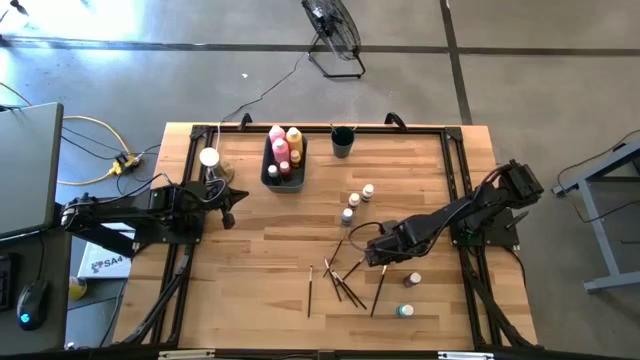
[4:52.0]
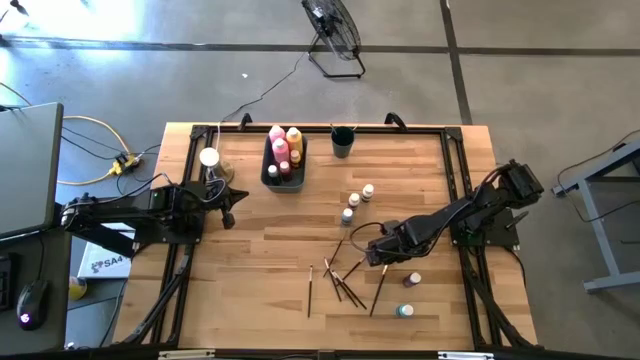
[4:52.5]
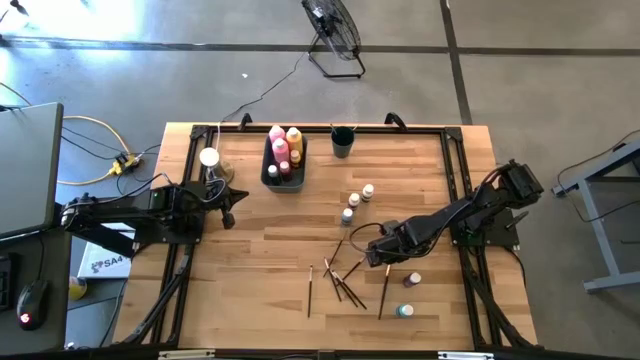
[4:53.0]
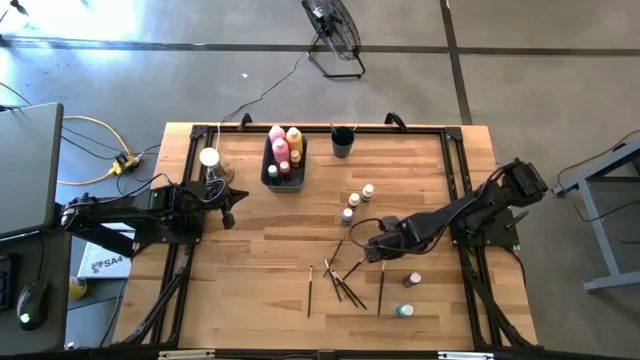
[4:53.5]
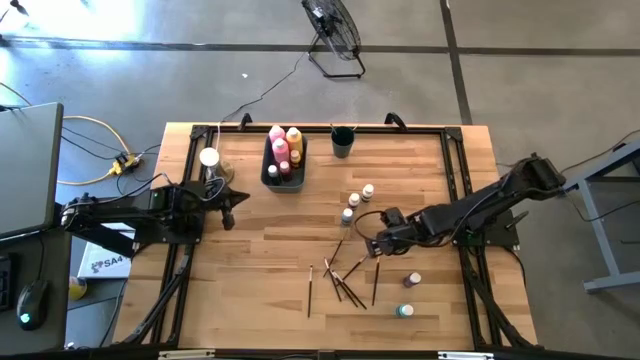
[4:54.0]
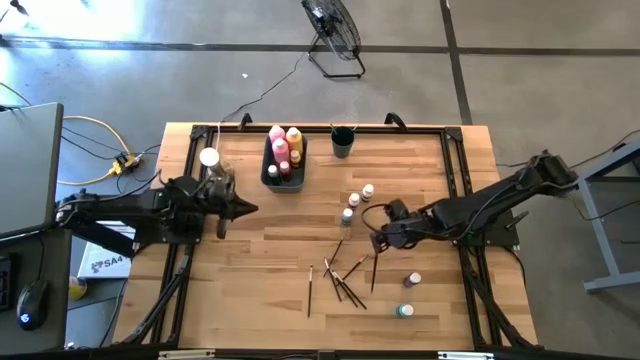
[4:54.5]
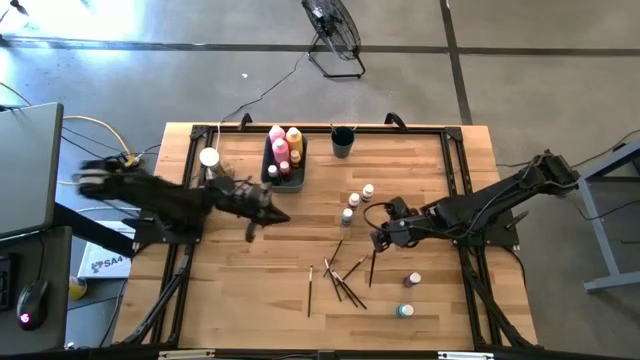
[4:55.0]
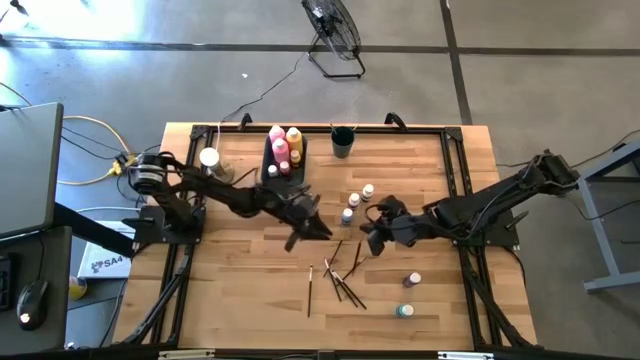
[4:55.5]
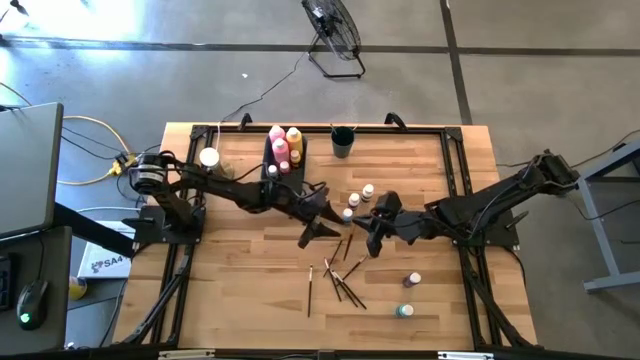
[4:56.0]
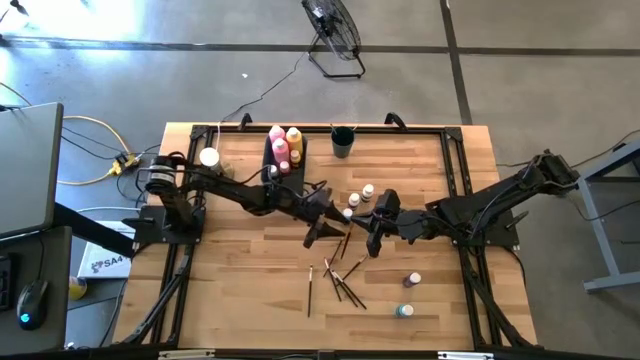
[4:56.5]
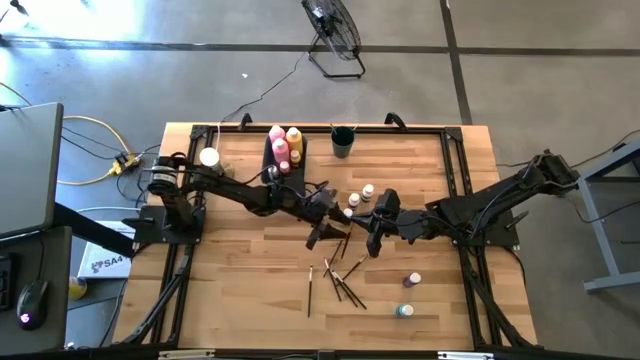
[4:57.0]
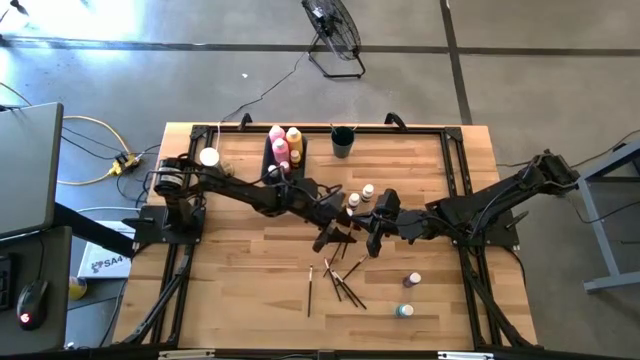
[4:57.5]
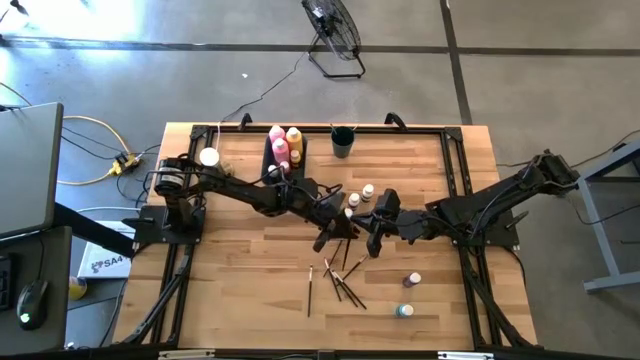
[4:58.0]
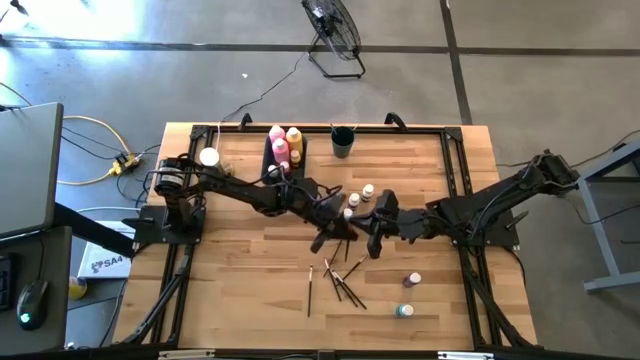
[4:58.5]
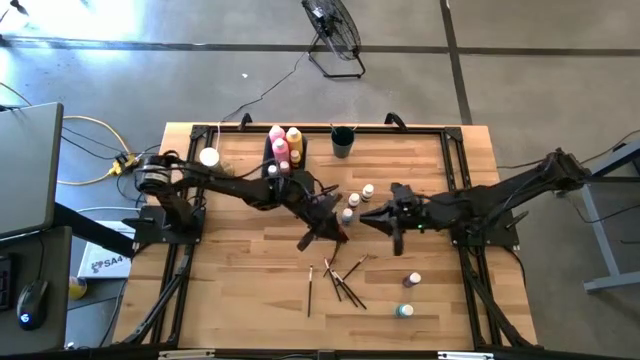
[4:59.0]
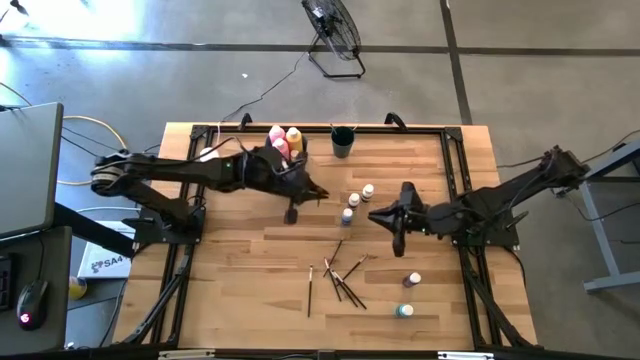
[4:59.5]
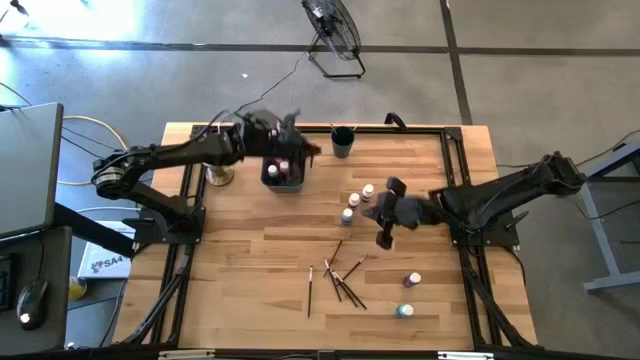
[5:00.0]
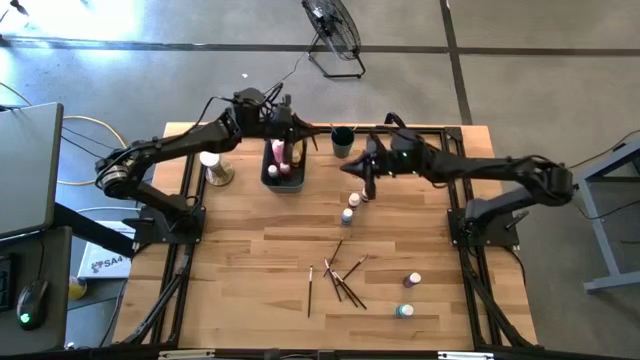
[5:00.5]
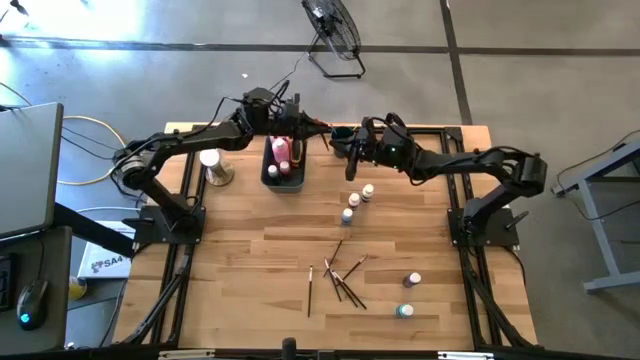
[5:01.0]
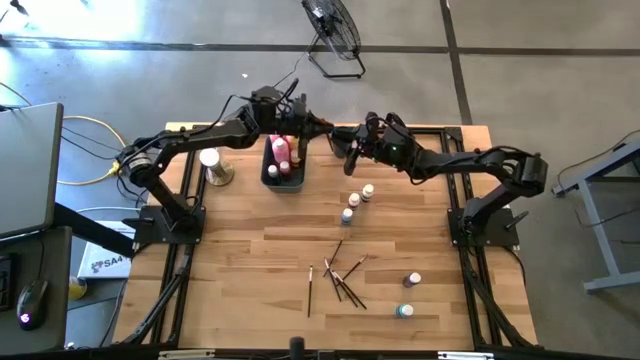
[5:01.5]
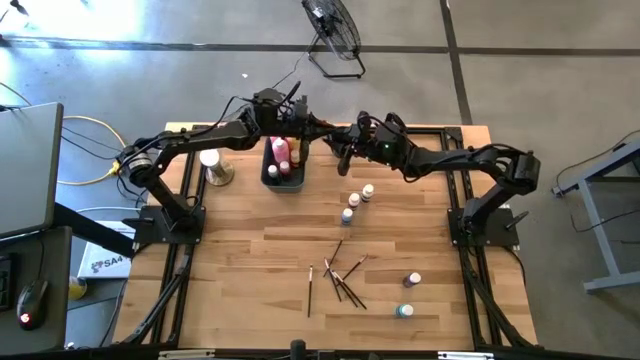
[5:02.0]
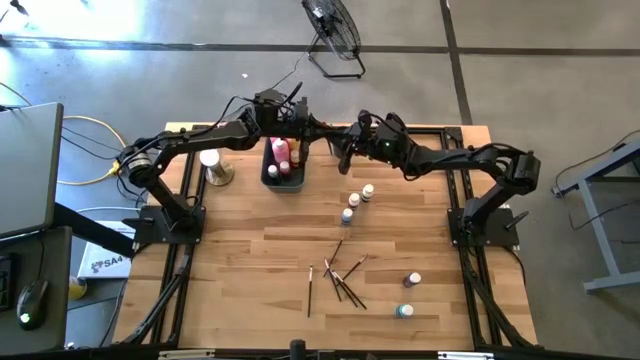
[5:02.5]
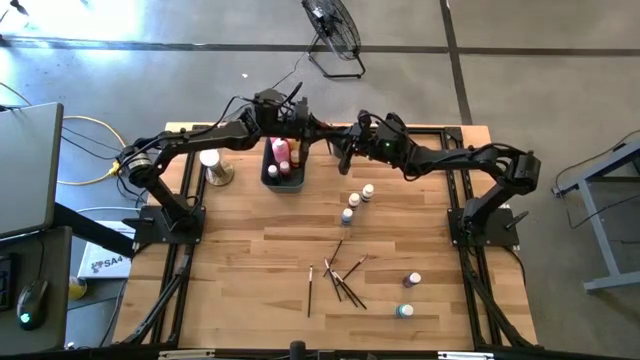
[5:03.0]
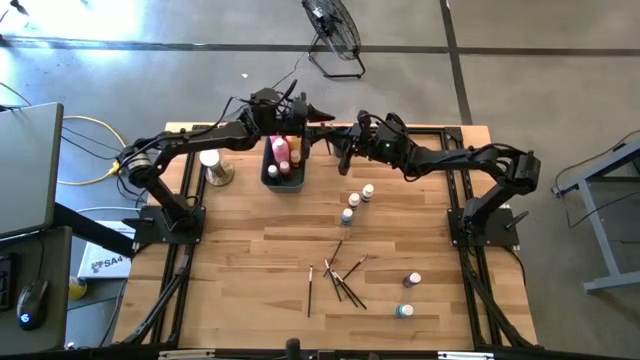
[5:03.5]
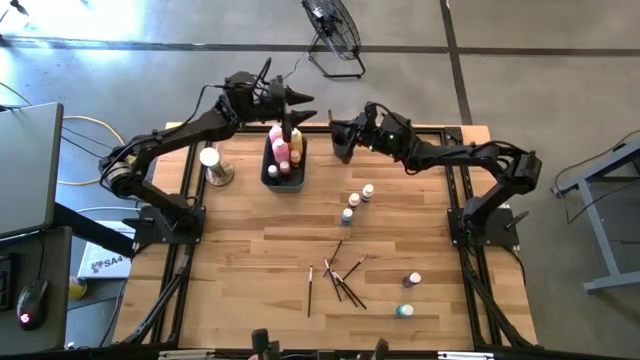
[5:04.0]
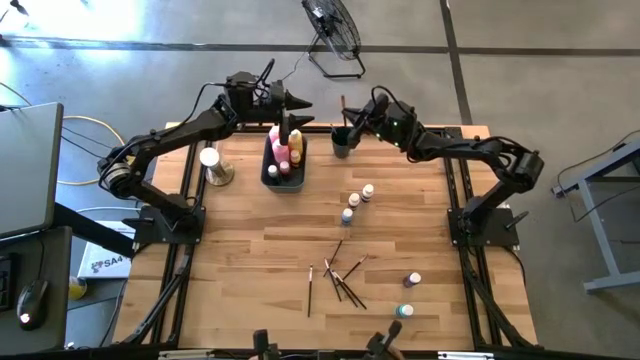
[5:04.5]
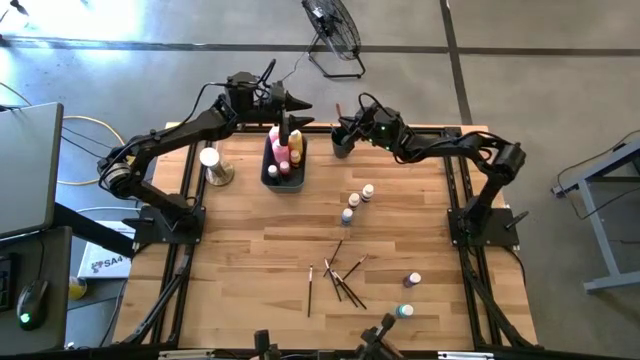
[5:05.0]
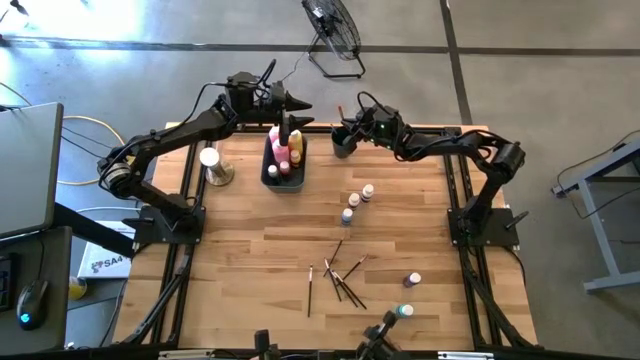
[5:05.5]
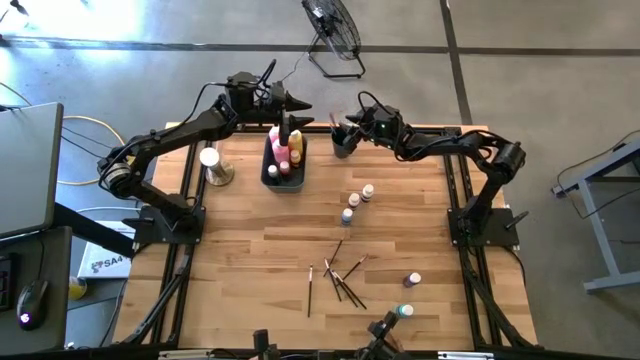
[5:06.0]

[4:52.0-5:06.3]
Task: Pick & Place Paint Supplies
Put the gold paint brush into the green bin
